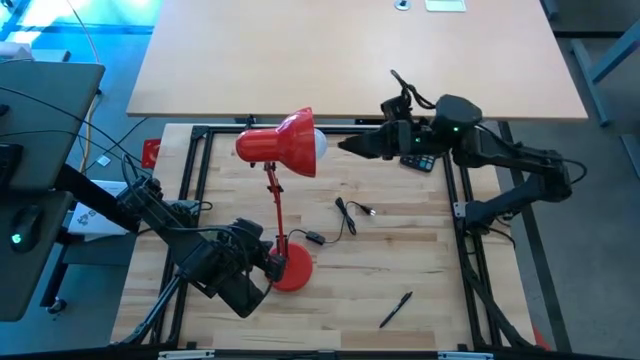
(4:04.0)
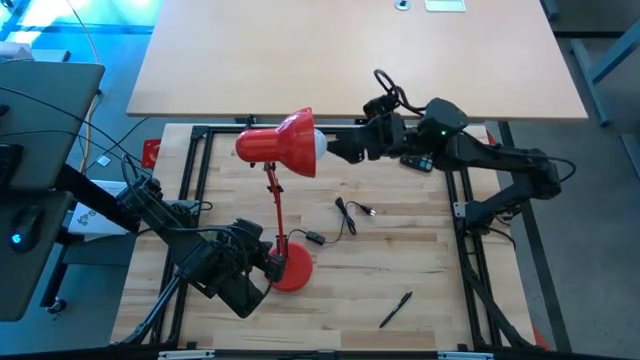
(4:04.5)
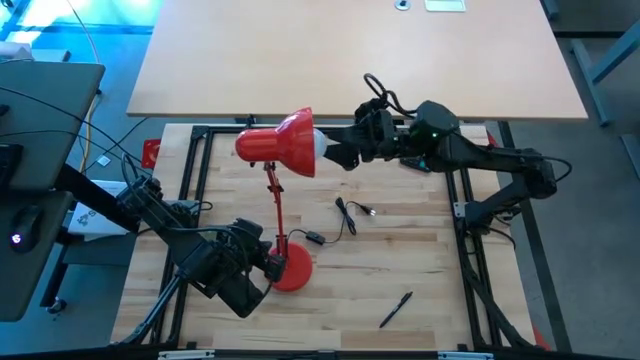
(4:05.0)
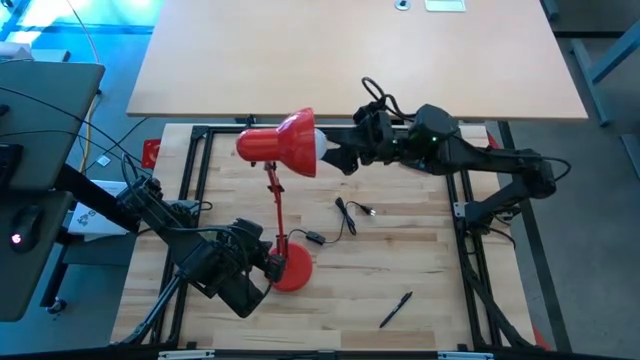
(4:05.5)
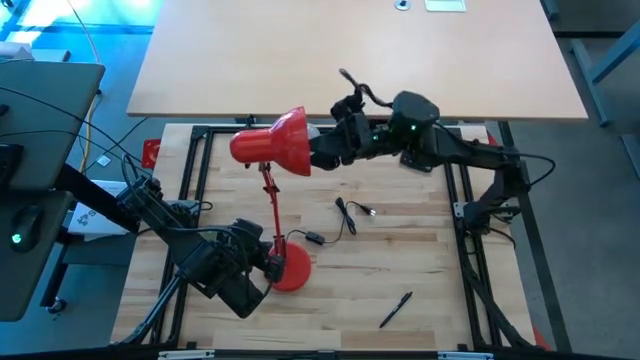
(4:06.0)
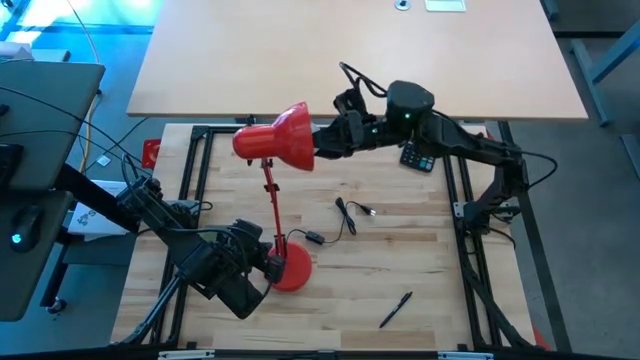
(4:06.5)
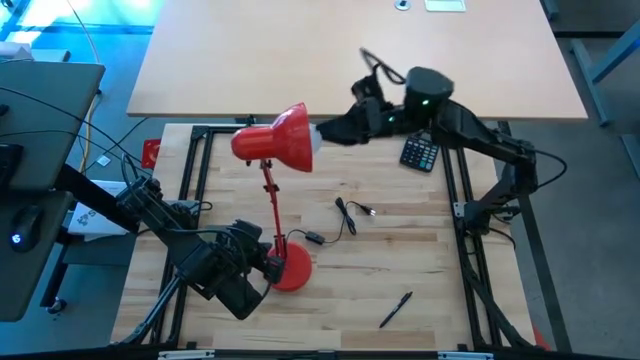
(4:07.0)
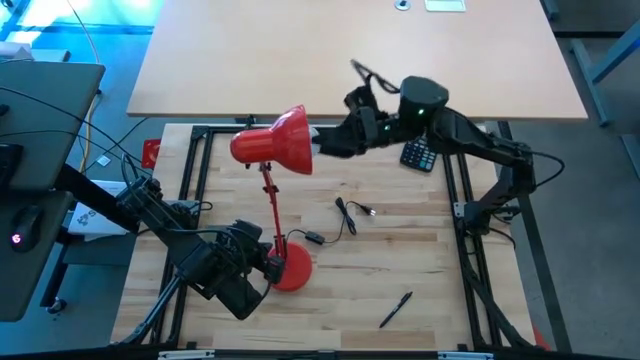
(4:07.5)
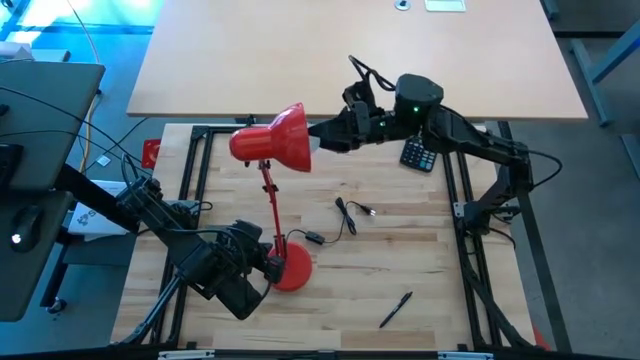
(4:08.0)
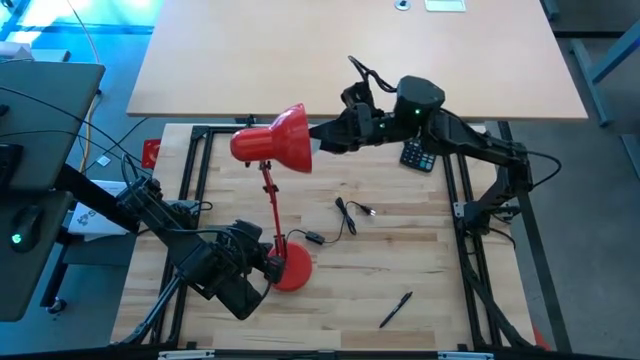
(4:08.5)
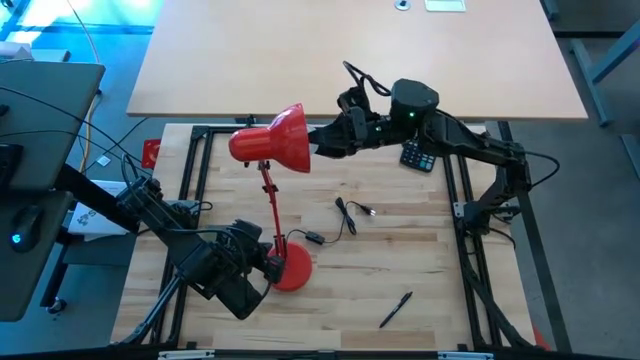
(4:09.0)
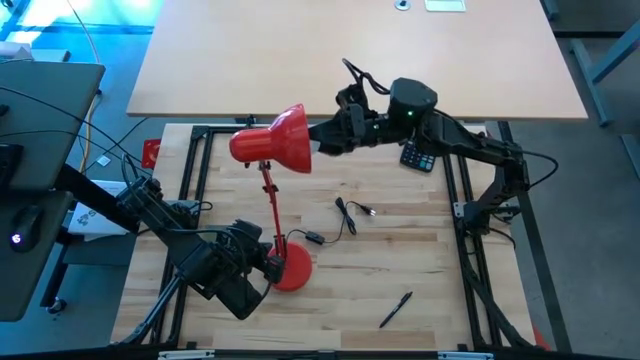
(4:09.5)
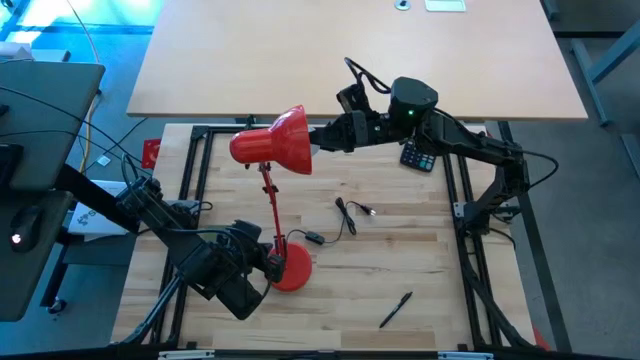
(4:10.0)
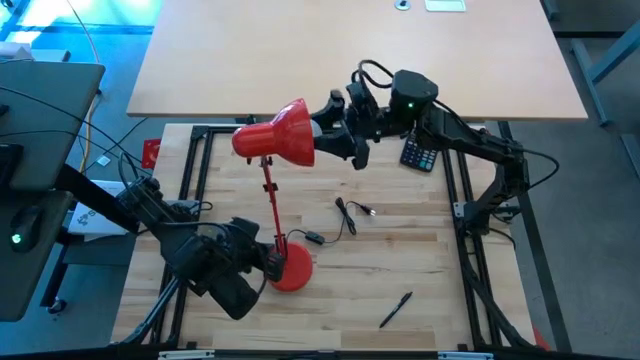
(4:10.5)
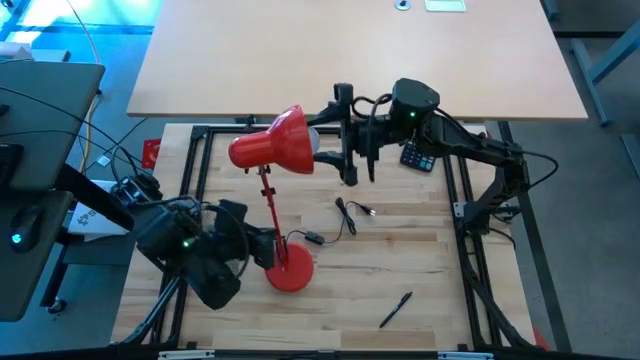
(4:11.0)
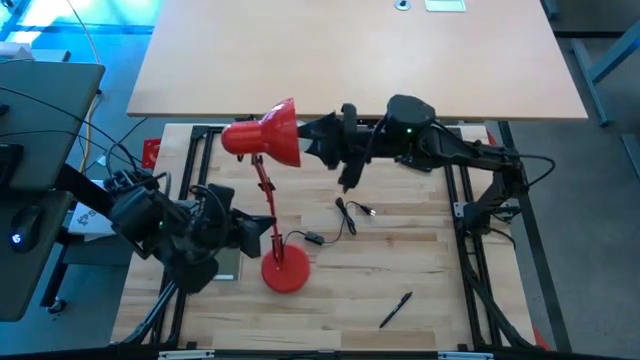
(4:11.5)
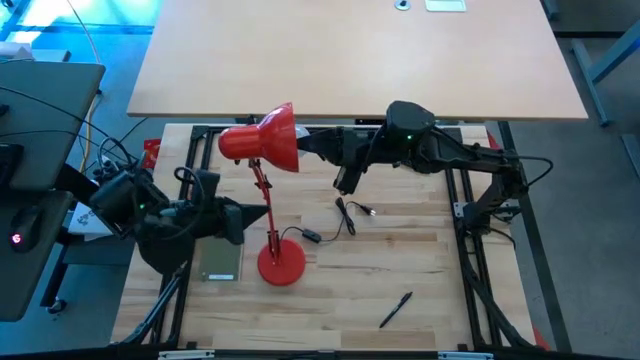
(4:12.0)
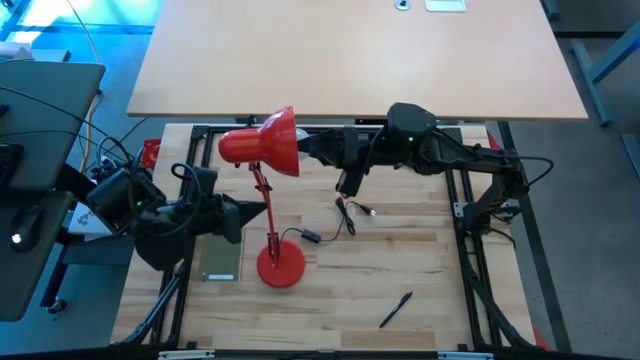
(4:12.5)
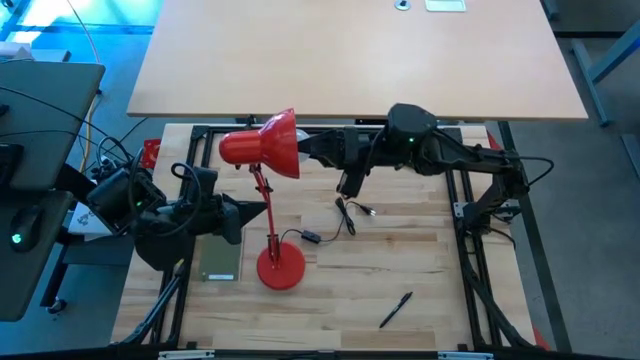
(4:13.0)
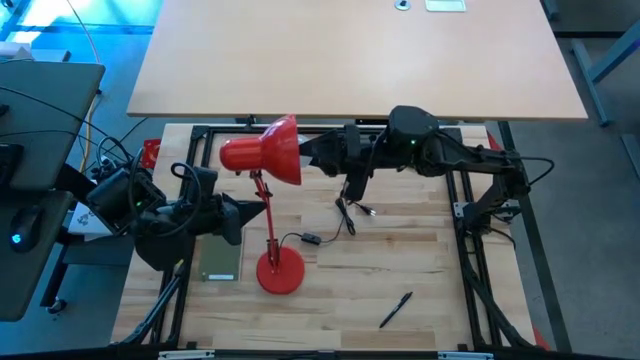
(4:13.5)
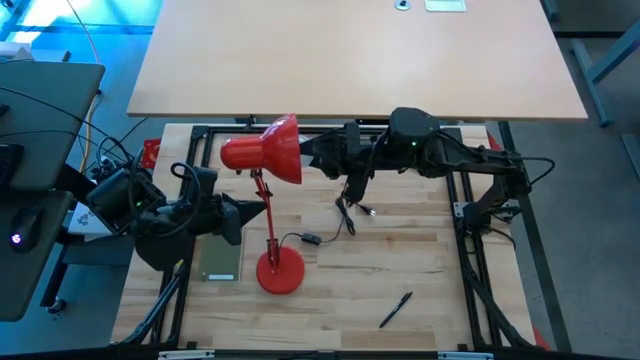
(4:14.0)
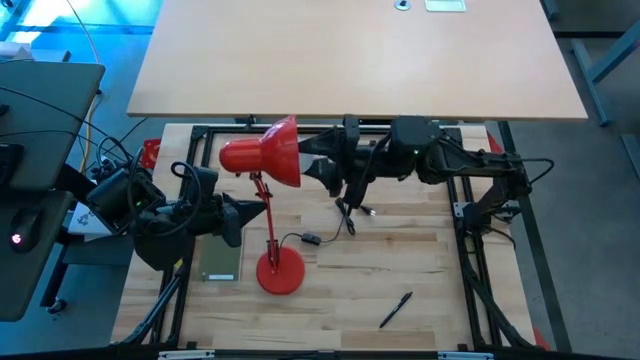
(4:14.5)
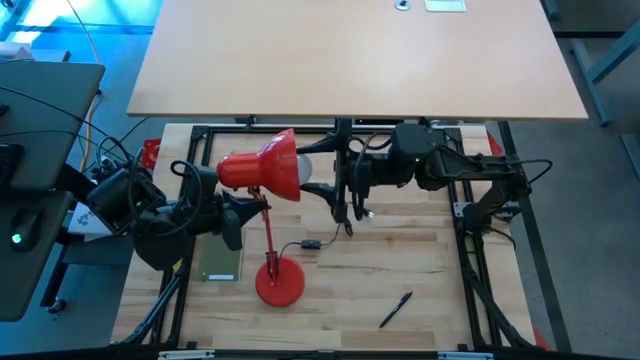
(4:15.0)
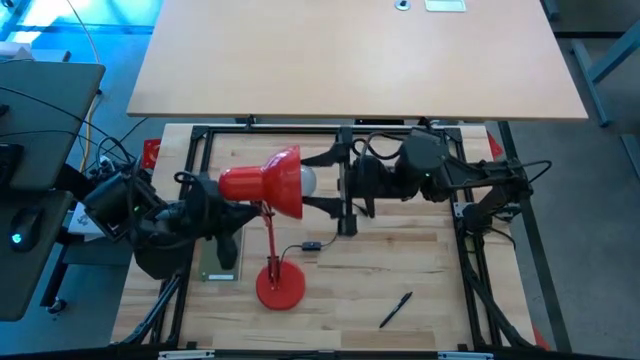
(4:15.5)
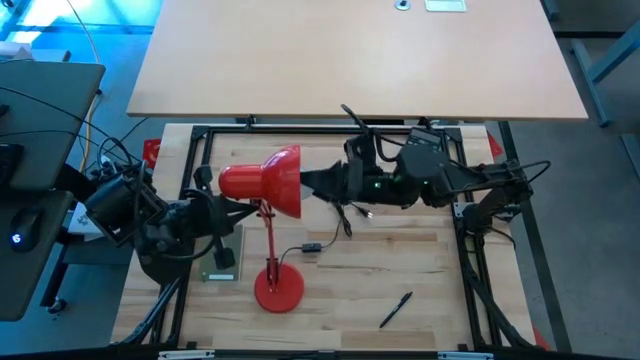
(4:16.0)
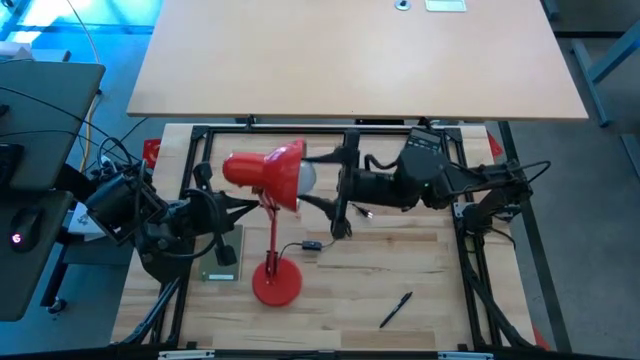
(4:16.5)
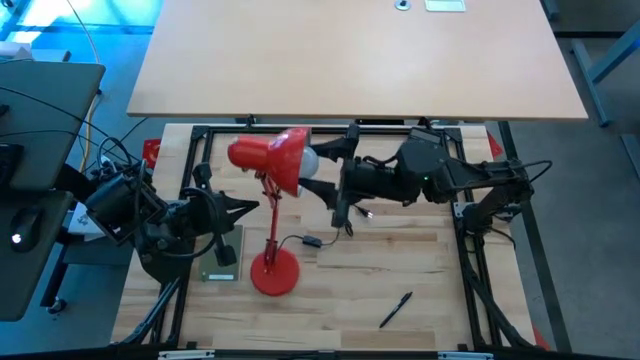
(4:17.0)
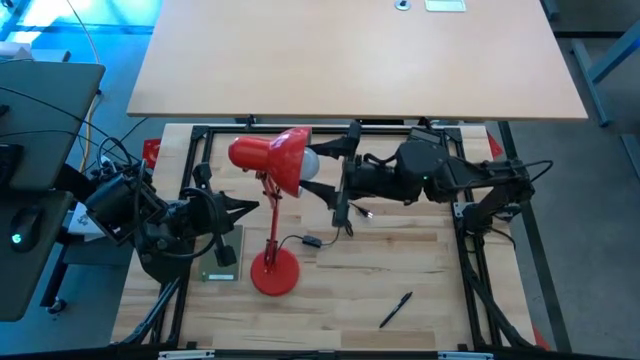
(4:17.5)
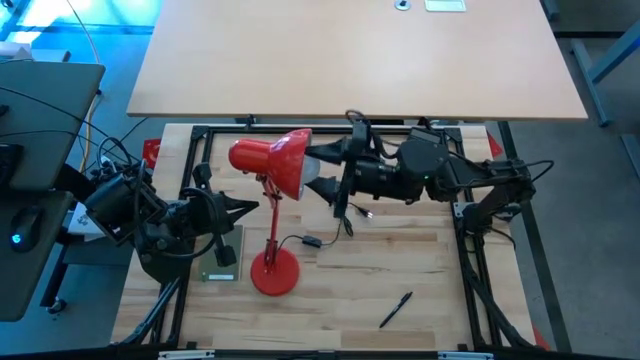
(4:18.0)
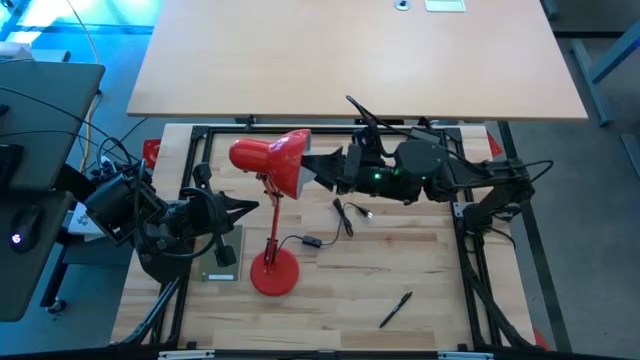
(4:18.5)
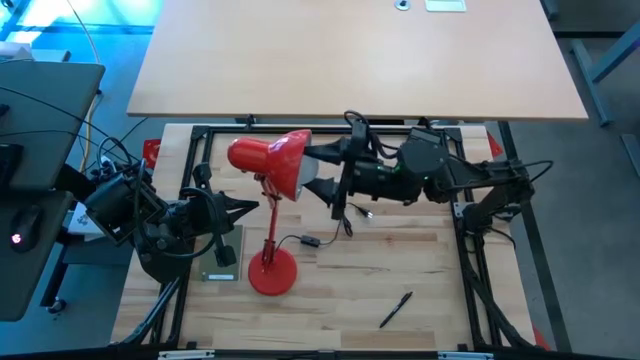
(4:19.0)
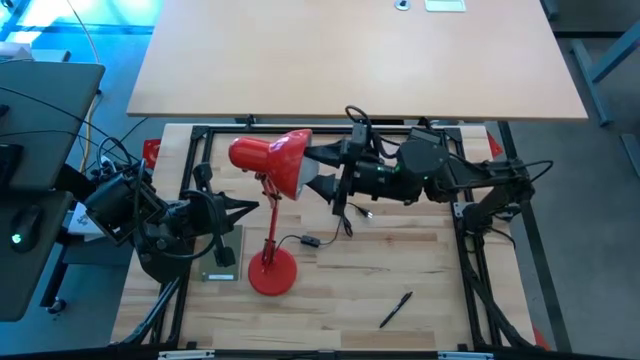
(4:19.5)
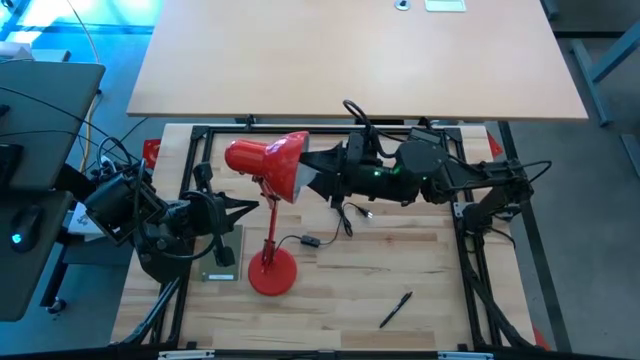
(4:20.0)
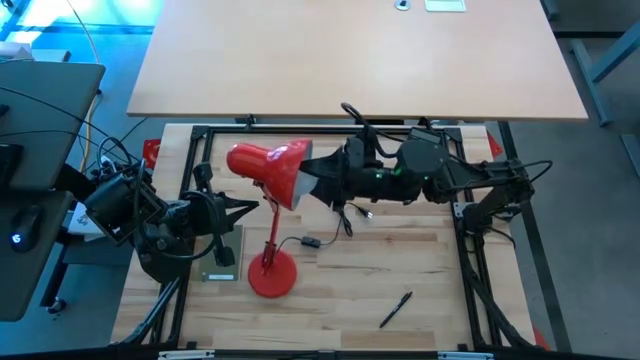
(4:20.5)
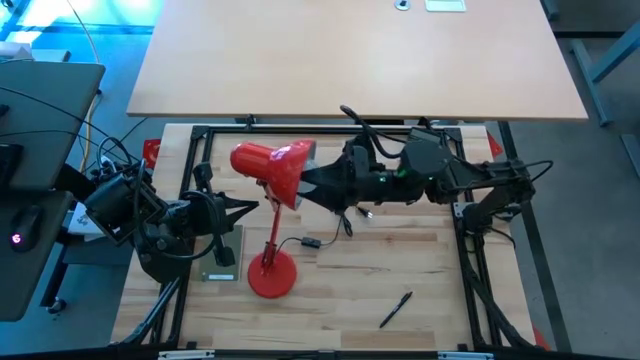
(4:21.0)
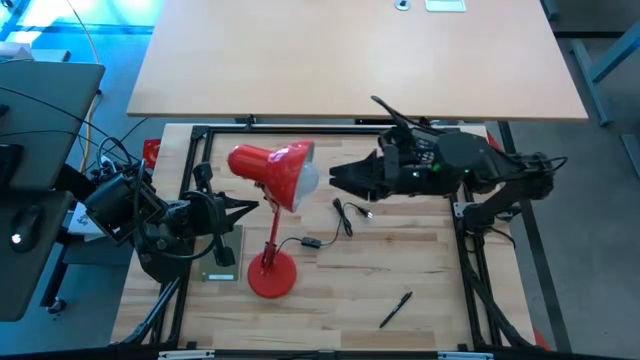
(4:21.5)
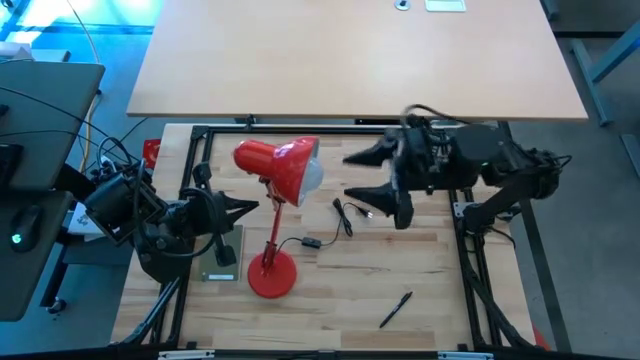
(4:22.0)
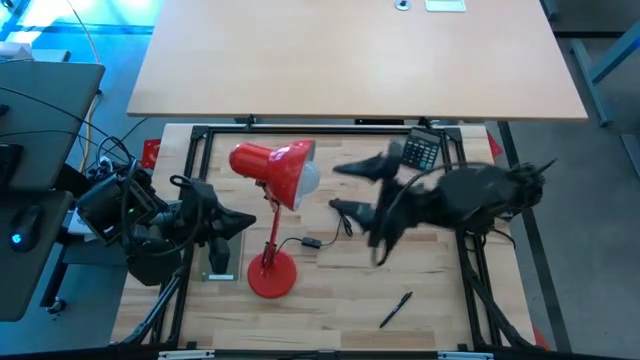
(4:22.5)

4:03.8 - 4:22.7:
Task: Screw lightbulb
Insert the white lightbulb into the red lamp

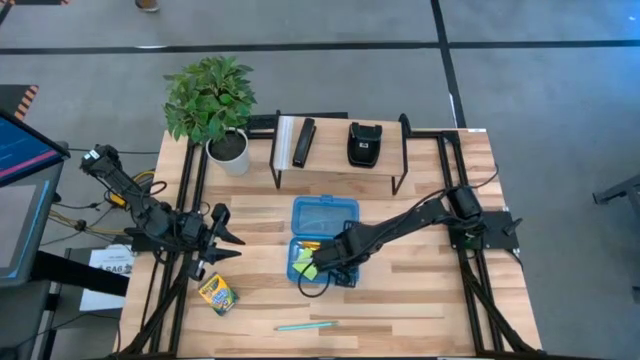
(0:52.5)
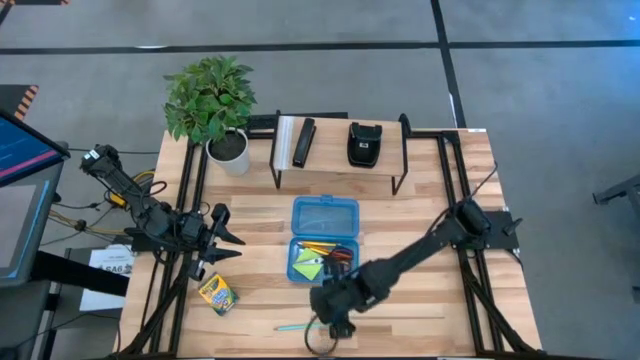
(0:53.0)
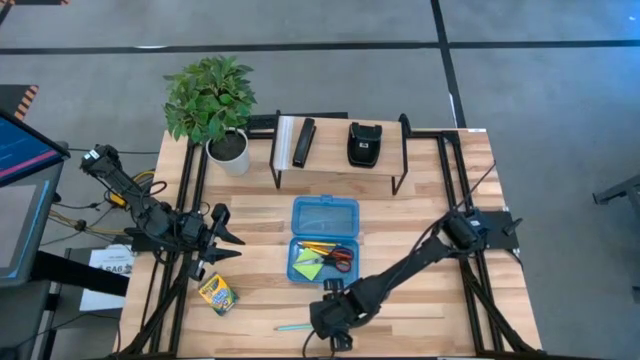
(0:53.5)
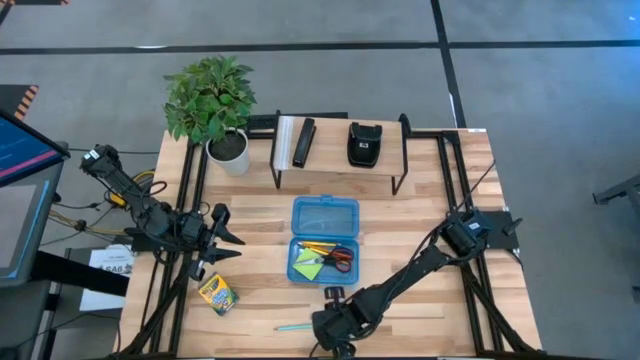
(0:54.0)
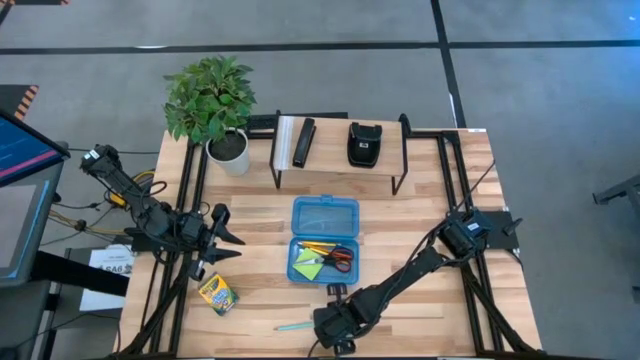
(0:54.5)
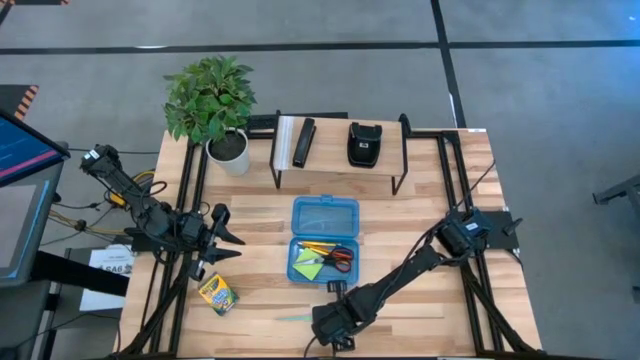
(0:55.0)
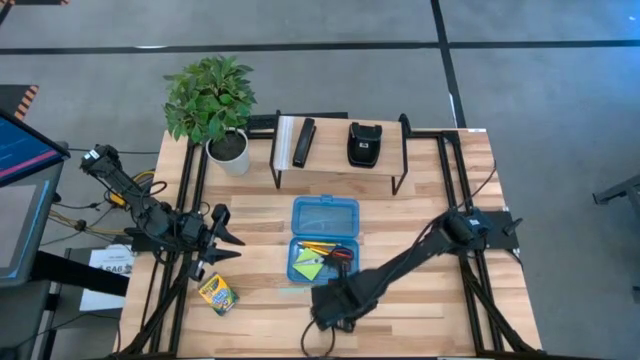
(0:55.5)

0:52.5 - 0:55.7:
Task: Pack school essentials
Put the blue pencil into the blue supply box
